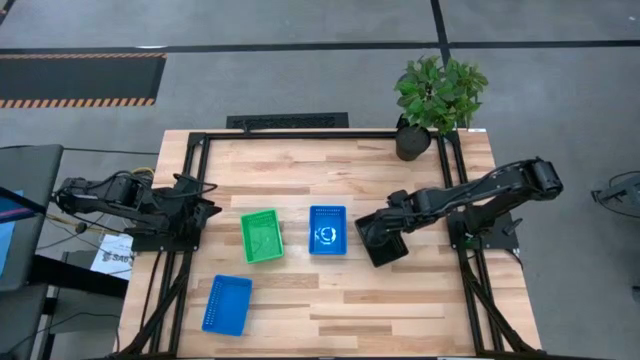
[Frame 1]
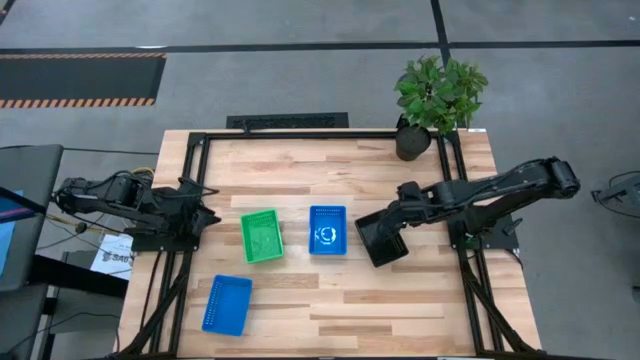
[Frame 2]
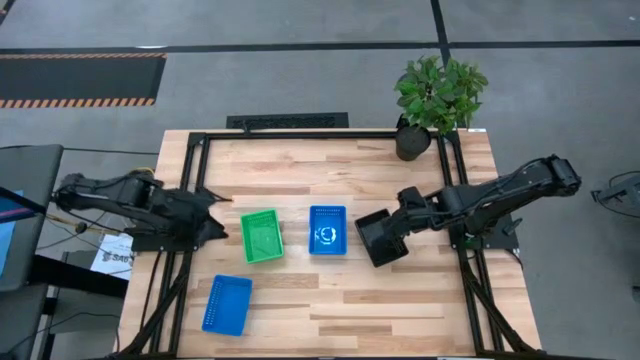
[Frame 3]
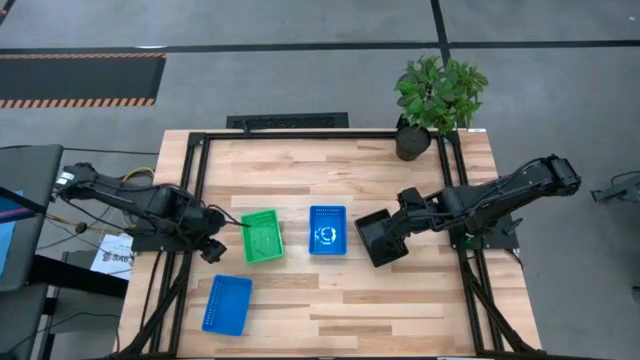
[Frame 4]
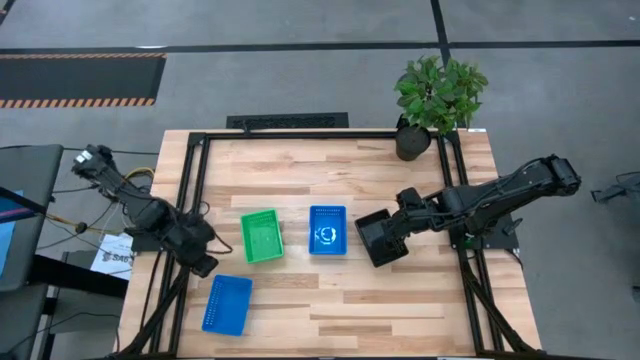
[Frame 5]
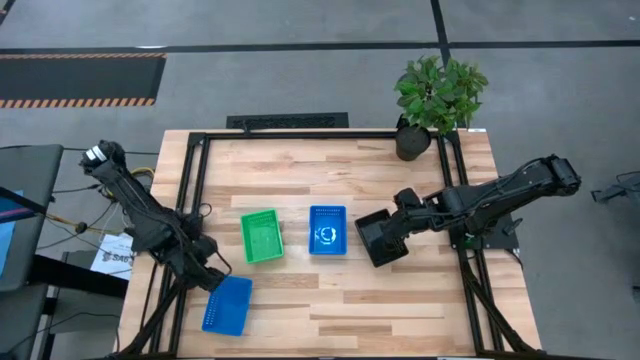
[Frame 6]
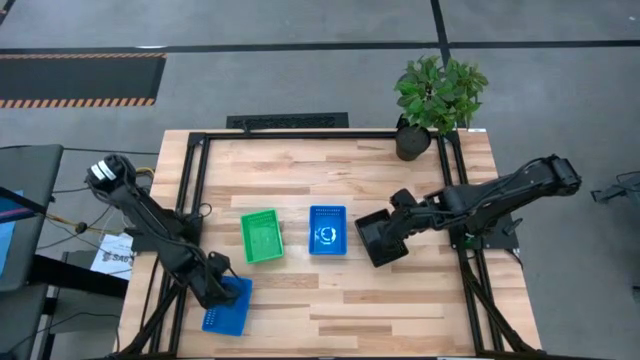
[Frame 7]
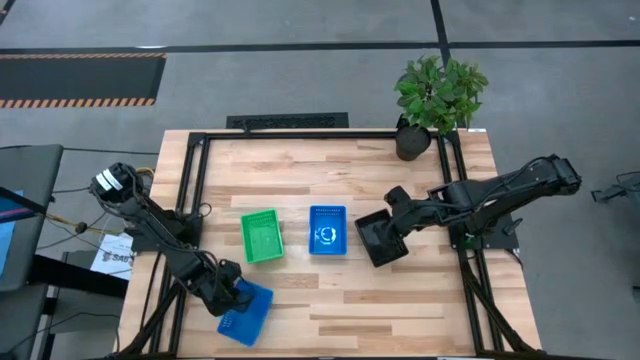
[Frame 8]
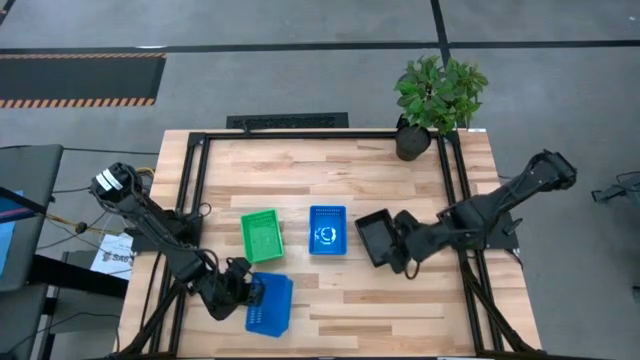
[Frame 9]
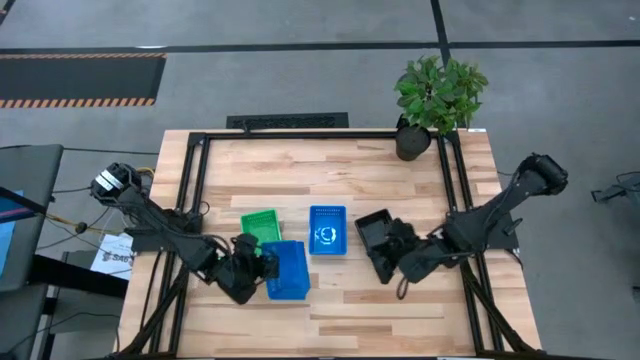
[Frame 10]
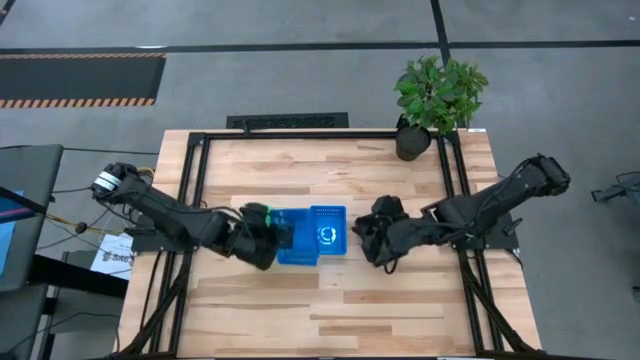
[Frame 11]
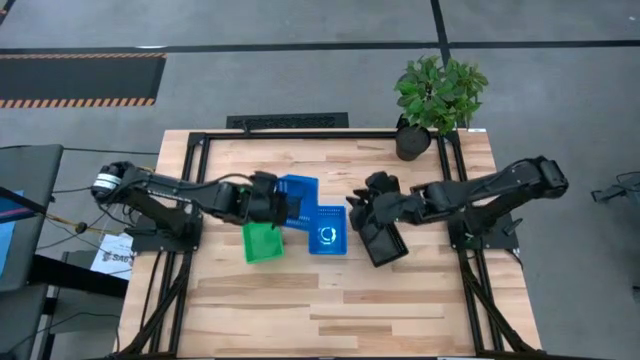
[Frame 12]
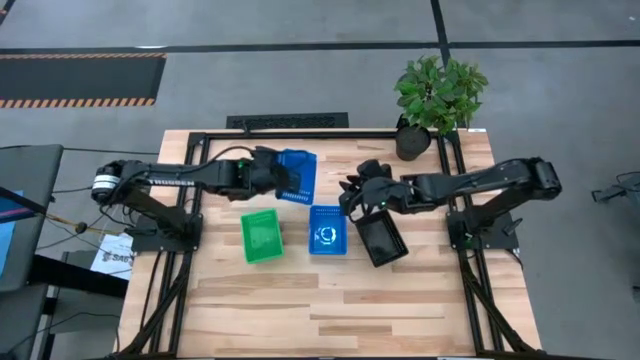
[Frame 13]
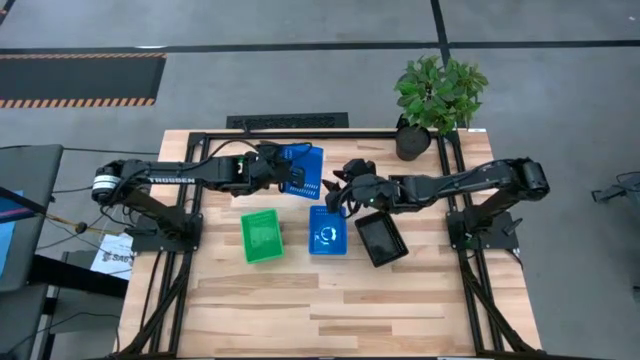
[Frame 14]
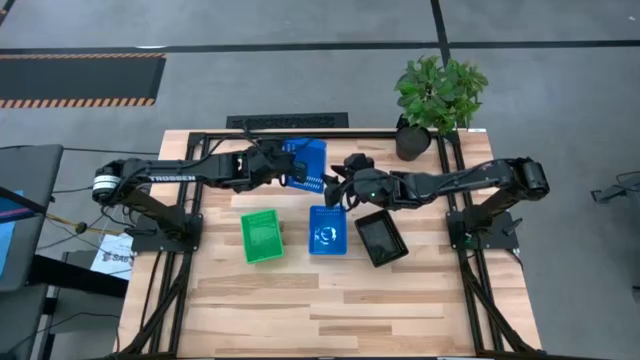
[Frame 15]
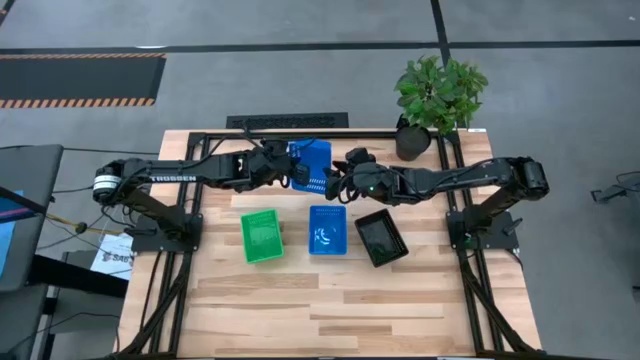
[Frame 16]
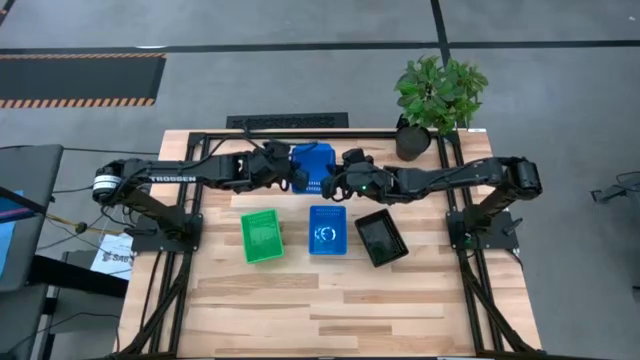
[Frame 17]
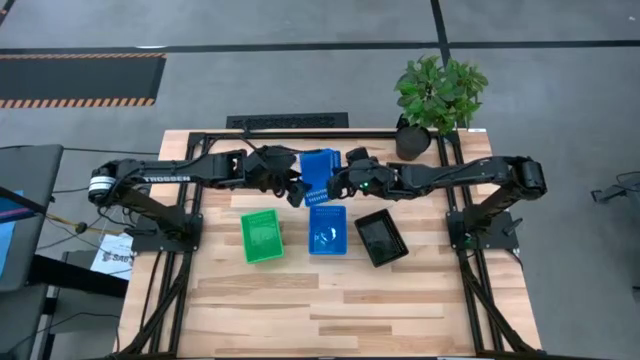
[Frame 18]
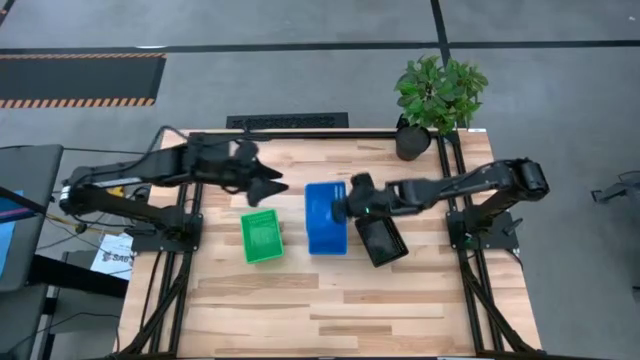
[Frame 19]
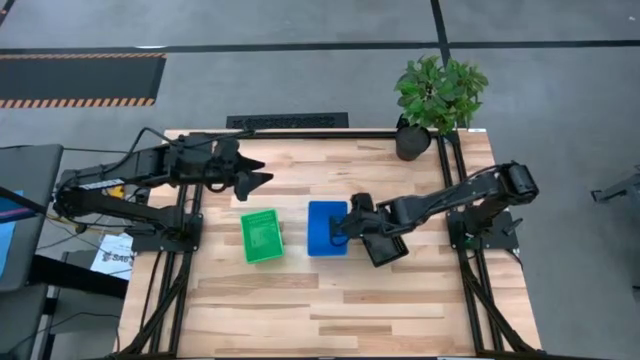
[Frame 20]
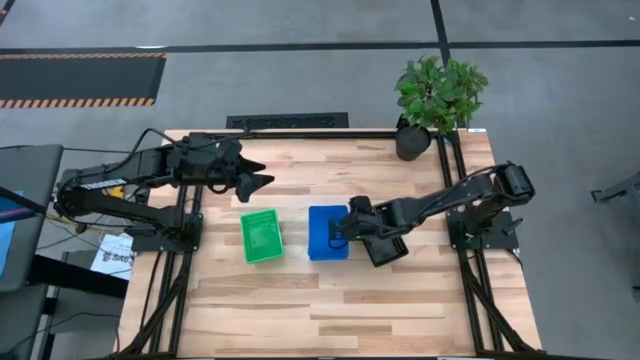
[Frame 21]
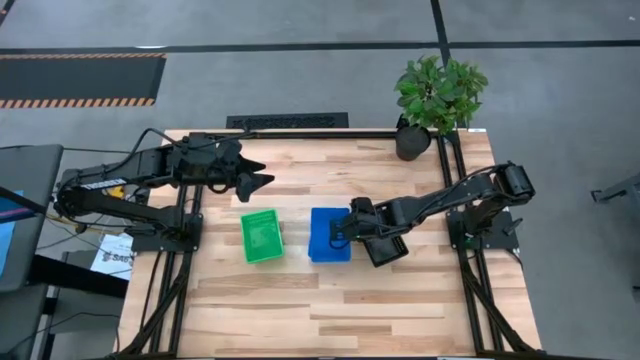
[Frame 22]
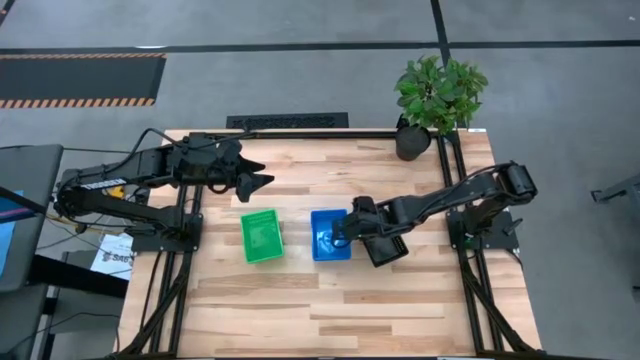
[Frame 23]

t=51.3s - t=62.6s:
Stack the left blue bin on top of the blue bin

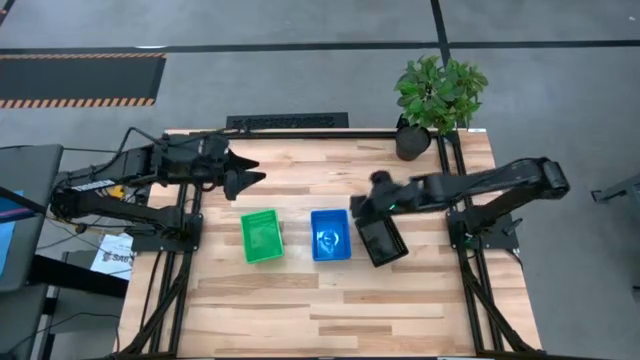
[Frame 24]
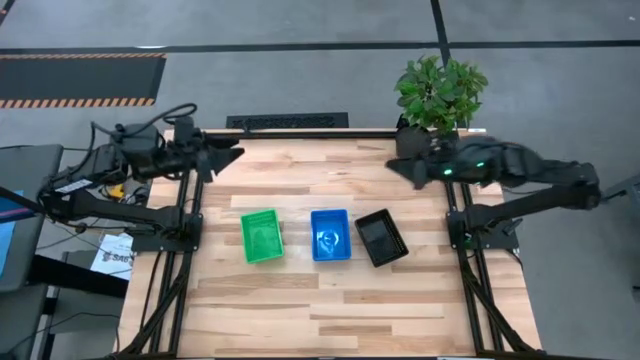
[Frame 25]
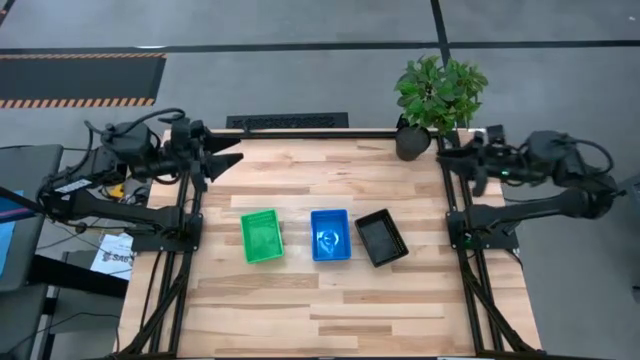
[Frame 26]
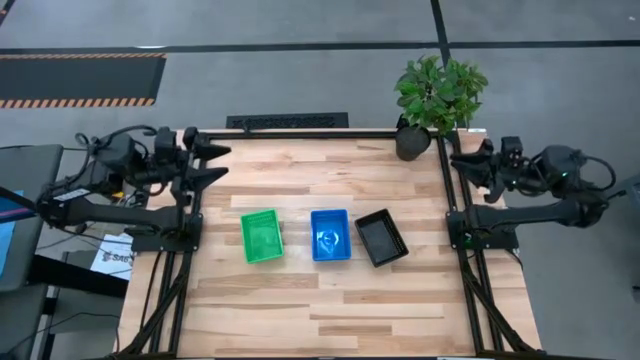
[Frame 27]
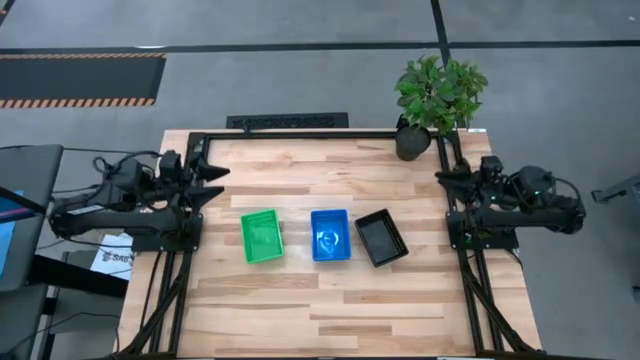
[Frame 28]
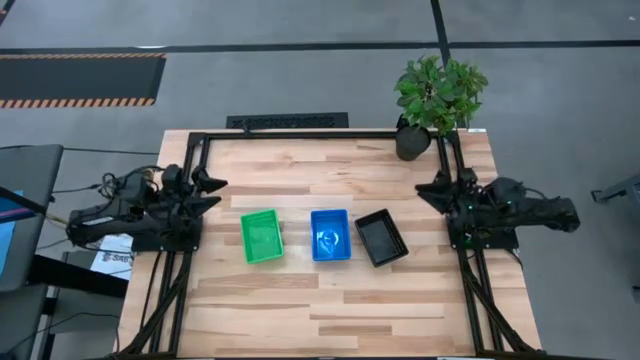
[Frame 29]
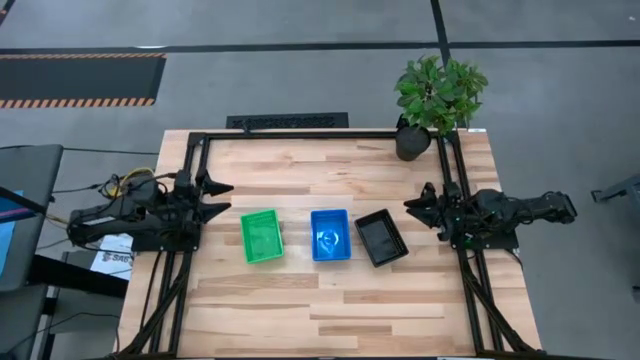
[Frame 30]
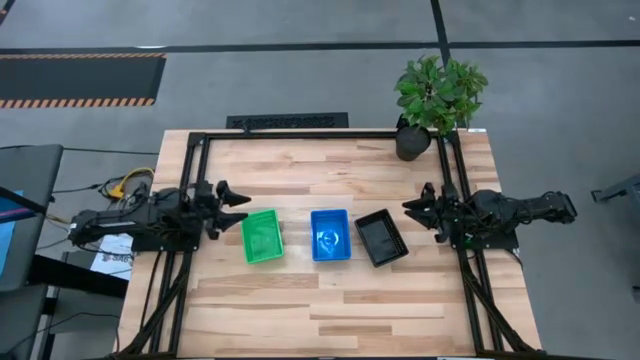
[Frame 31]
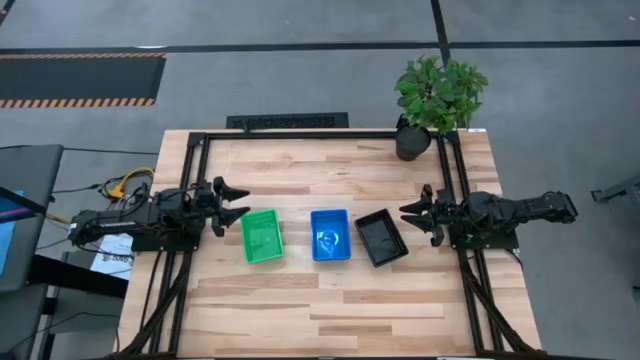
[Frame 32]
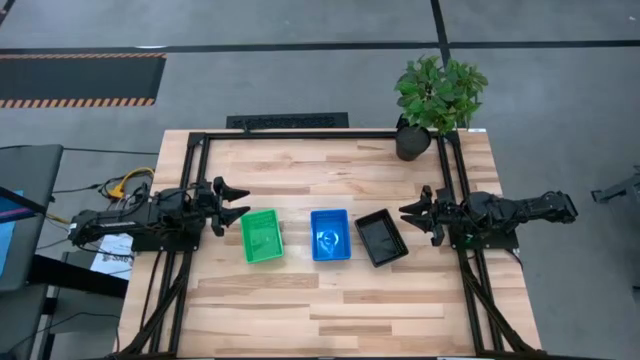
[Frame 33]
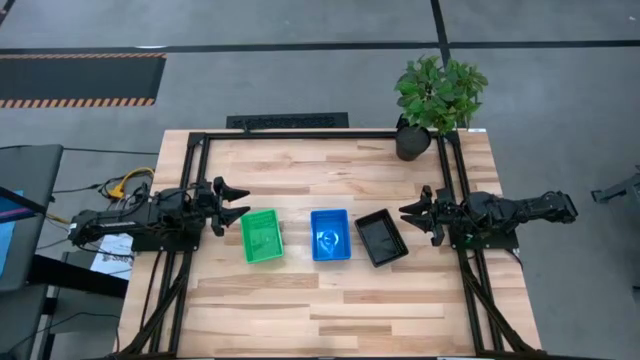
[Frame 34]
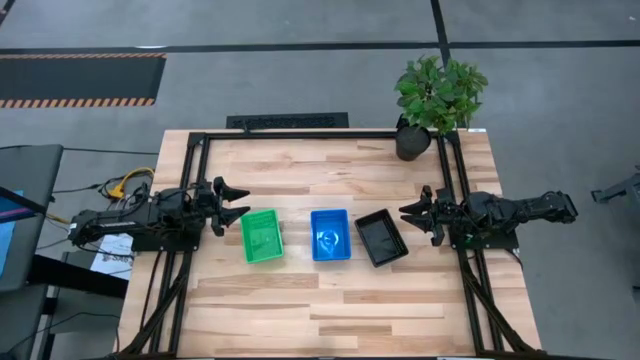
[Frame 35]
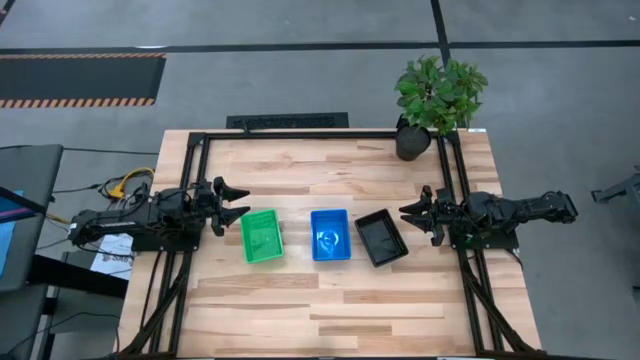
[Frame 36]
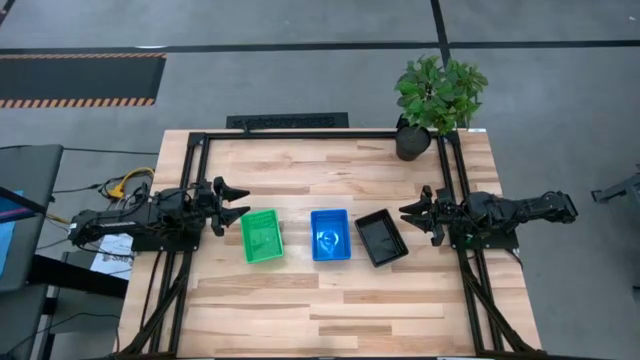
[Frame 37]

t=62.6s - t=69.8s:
Return to Home Position
